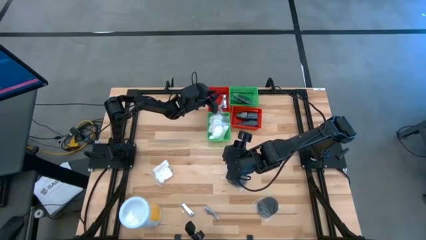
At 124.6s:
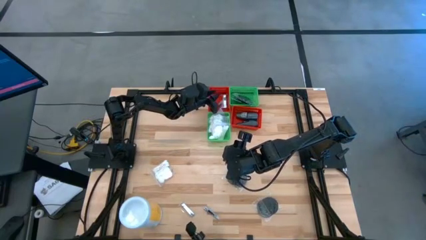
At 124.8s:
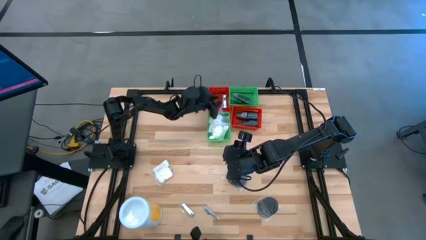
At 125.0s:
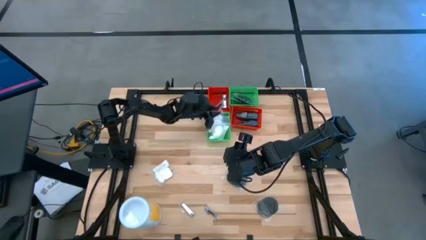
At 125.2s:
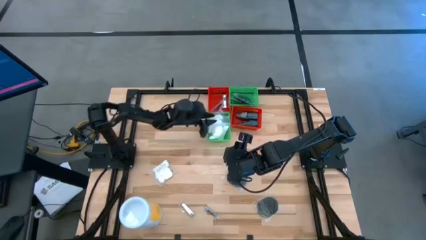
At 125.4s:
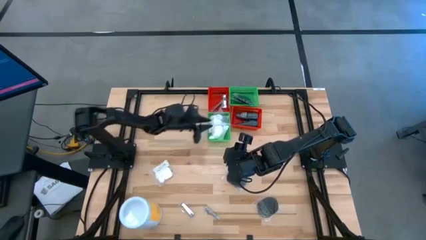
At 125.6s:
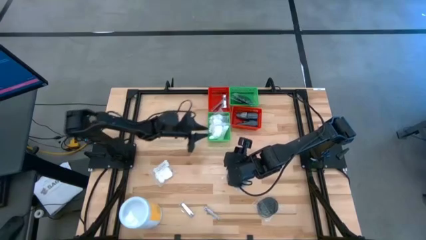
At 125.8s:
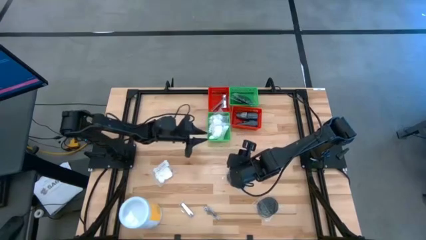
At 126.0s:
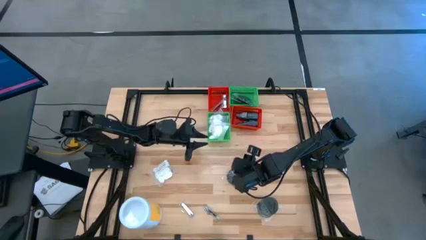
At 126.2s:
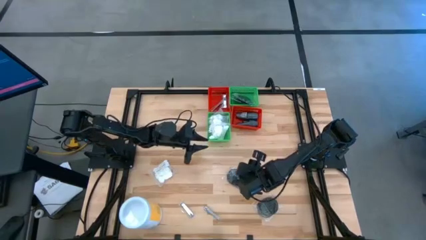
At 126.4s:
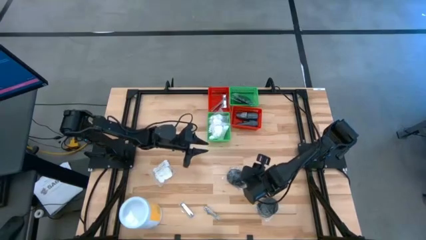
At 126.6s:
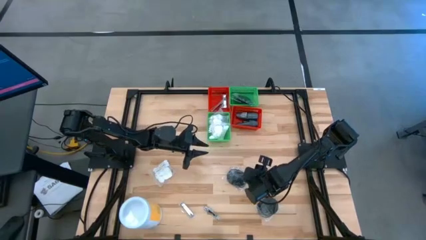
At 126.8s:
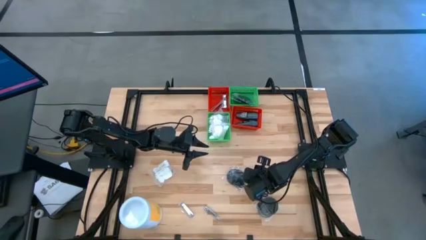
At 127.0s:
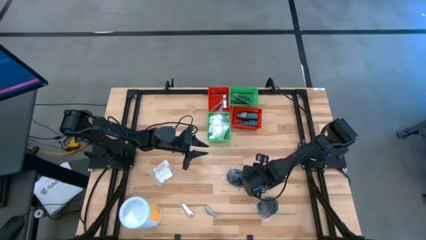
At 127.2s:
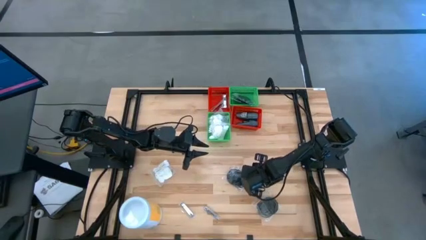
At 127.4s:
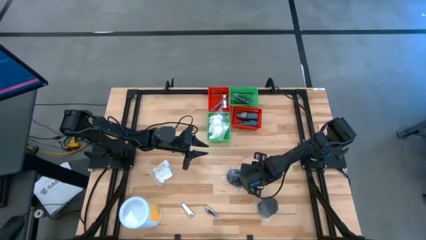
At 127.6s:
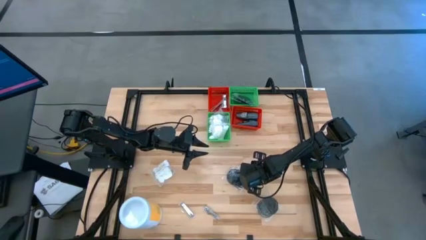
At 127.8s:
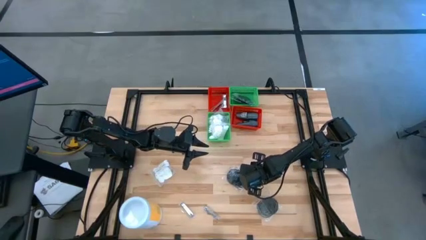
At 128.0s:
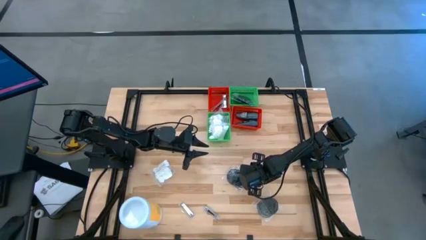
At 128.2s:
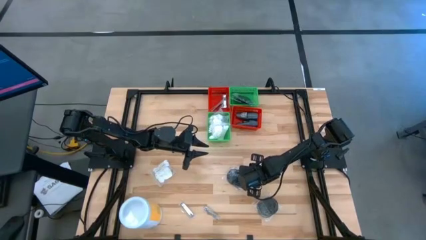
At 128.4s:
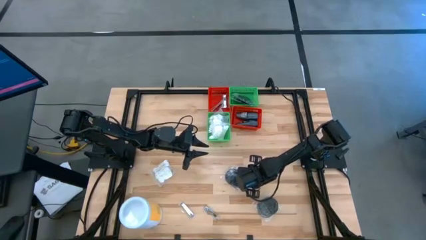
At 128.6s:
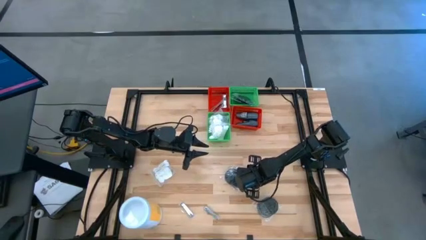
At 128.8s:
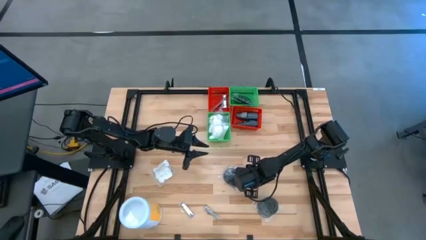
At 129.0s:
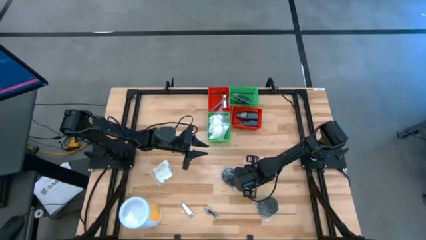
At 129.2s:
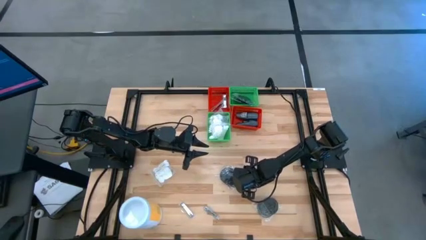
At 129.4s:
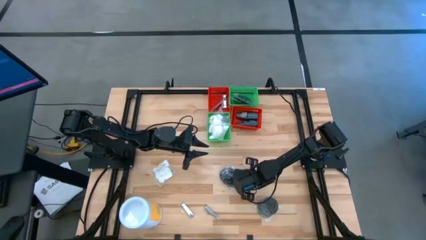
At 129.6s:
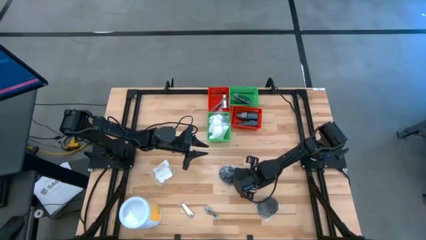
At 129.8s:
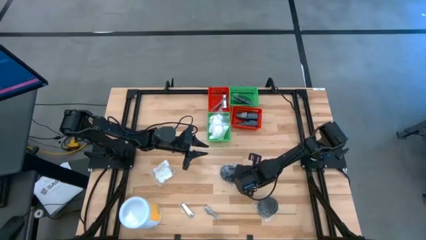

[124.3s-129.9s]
Task: Pick & Place Travel size toiletries
Put the hairbrush into the right green bin

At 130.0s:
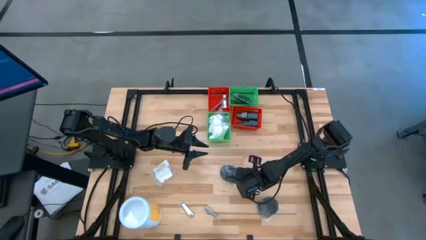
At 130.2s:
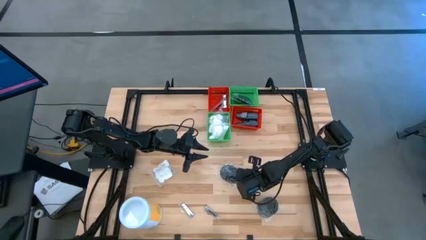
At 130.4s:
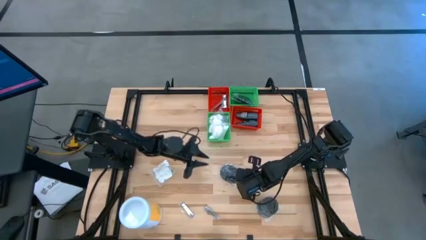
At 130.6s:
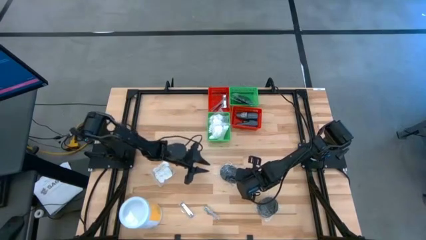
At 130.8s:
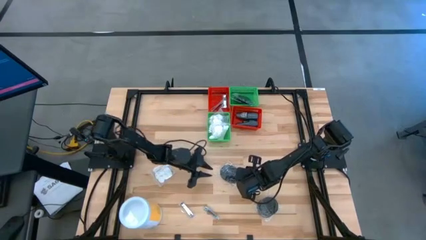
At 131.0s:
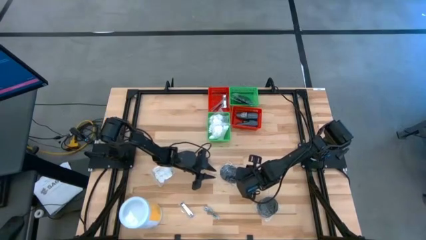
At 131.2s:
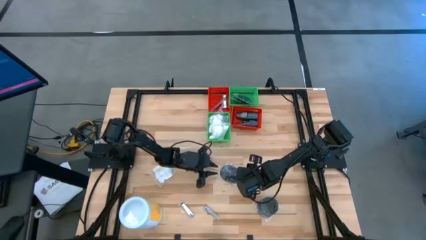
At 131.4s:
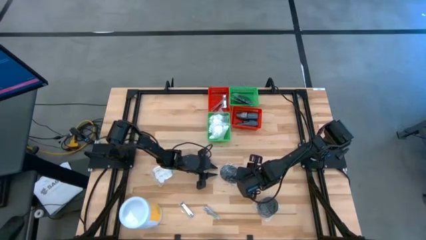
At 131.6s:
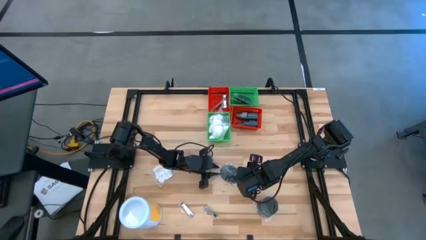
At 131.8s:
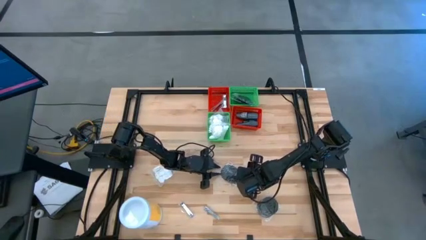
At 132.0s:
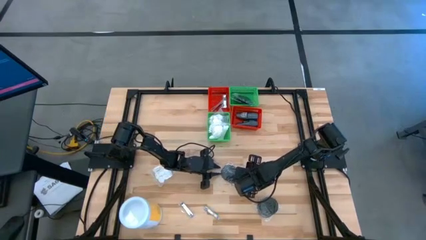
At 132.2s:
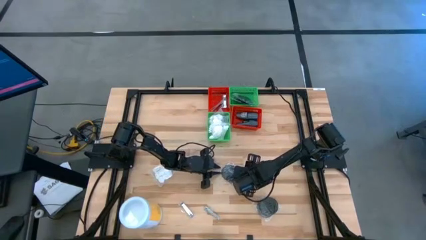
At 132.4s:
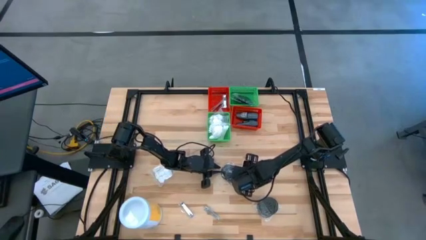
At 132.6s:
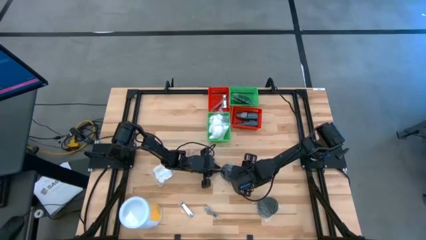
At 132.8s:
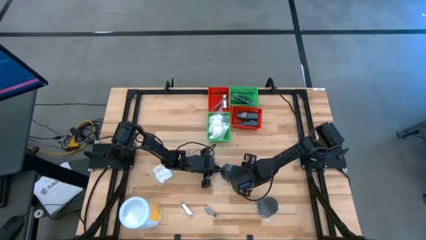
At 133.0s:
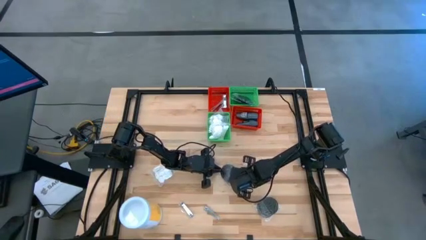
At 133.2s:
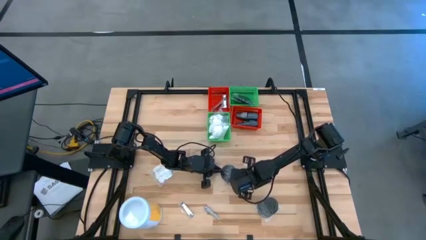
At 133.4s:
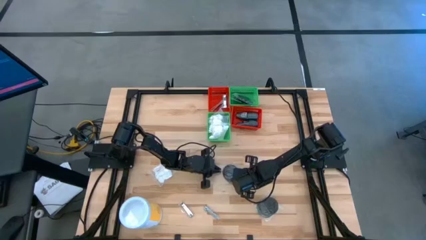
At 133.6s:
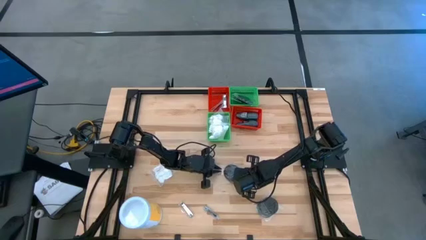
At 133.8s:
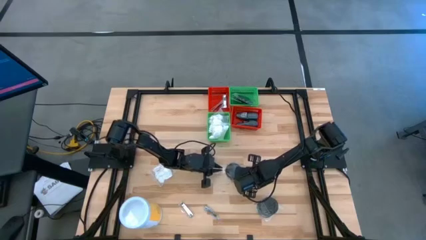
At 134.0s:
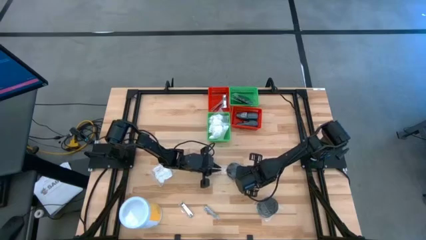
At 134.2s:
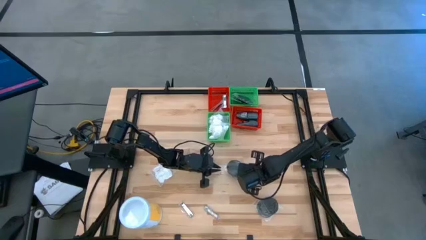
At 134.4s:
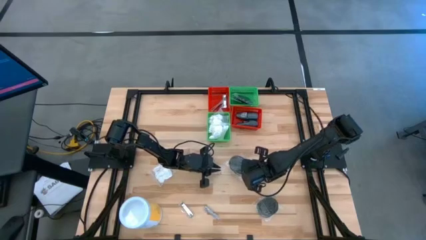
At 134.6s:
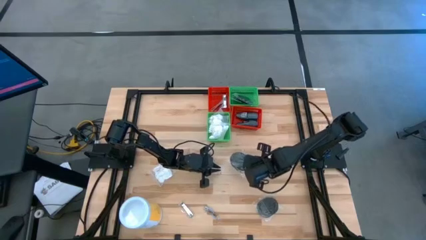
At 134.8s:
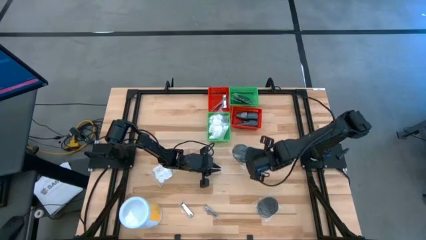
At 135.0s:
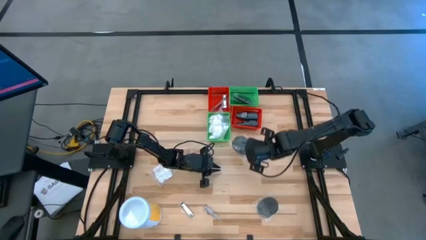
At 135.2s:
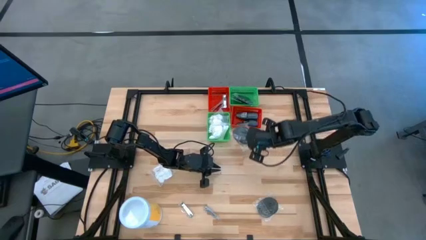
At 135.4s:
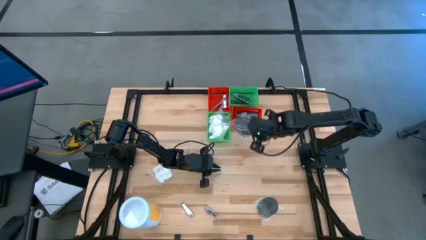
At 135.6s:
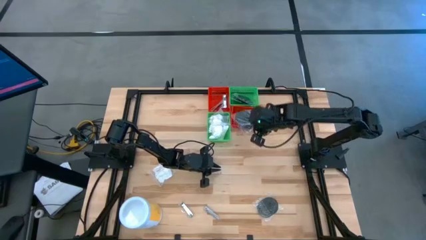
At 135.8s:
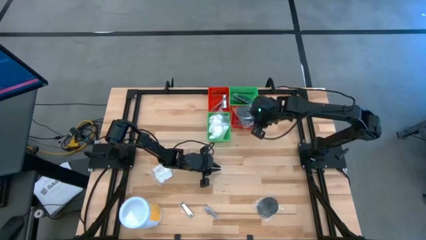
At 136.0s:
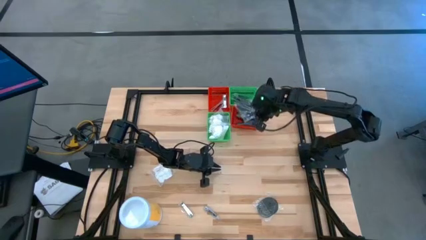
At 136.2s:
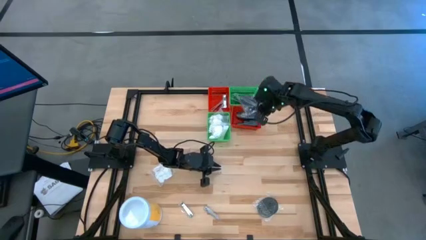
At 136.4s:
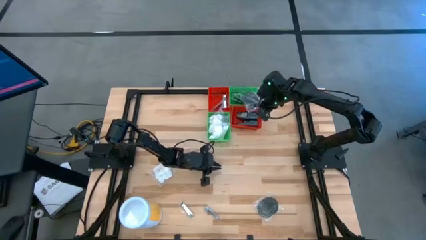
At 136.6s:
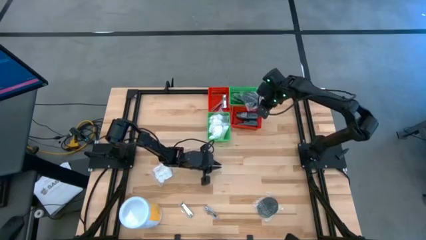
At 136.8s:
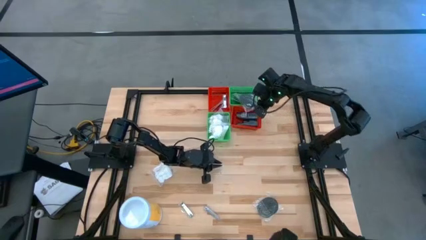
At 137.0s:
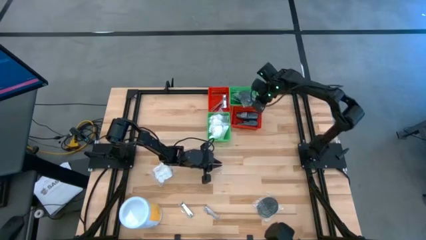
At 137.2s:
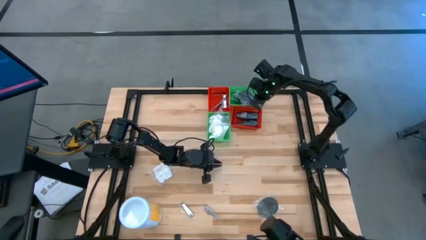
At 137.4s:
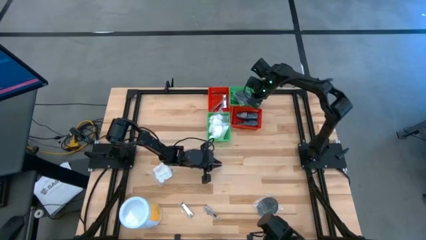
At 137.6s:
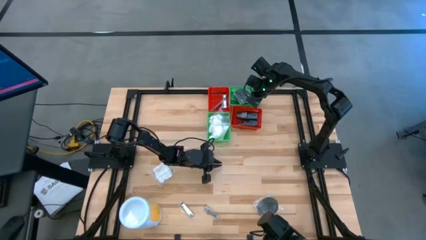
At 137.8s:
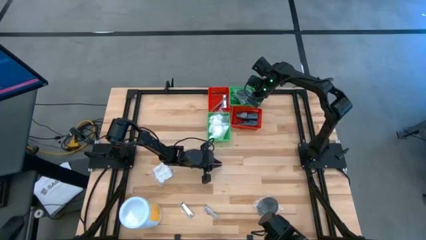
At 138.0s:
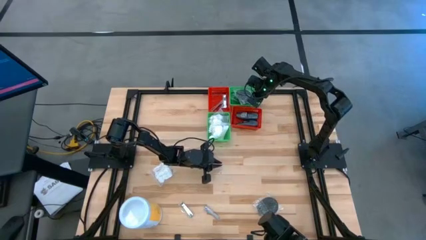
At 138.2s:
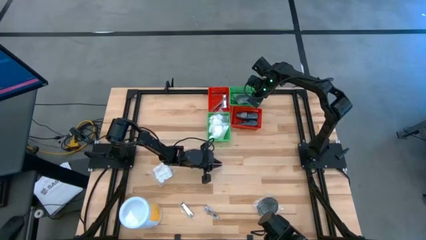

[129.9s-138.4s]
Put the hairbrush into the right green bin
